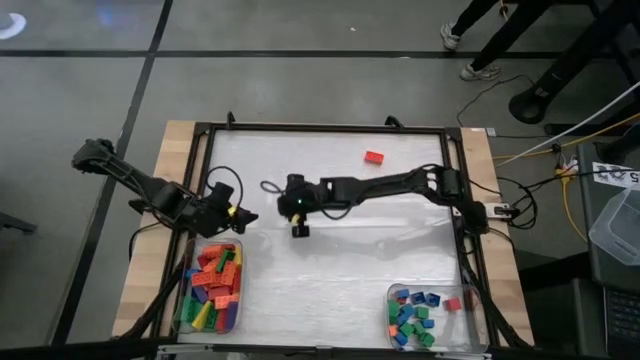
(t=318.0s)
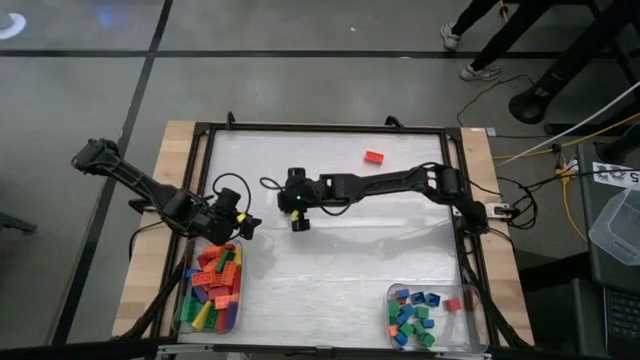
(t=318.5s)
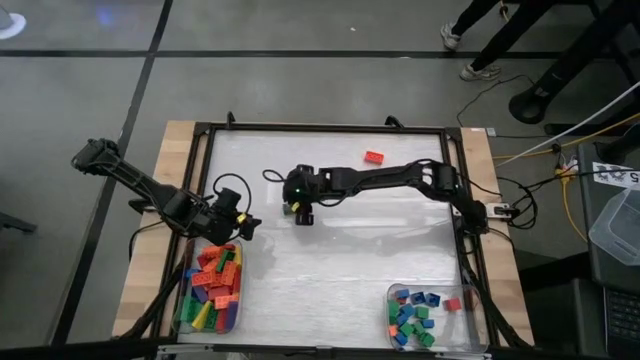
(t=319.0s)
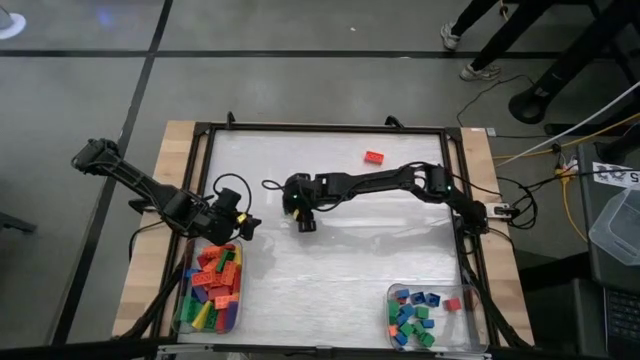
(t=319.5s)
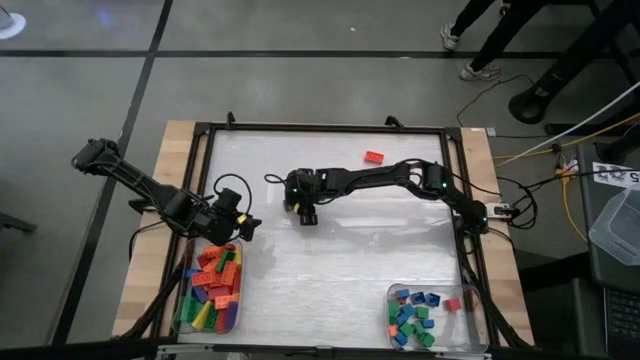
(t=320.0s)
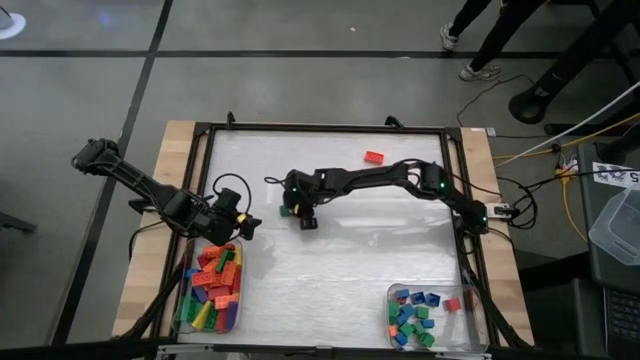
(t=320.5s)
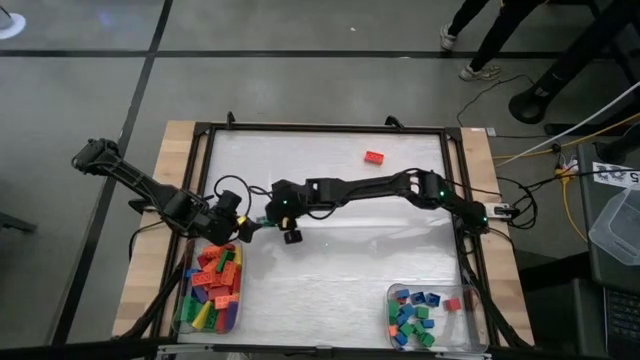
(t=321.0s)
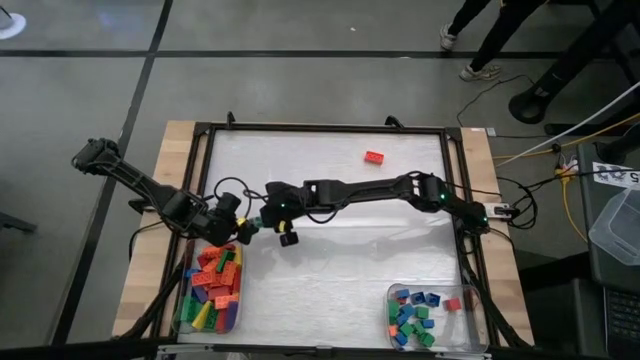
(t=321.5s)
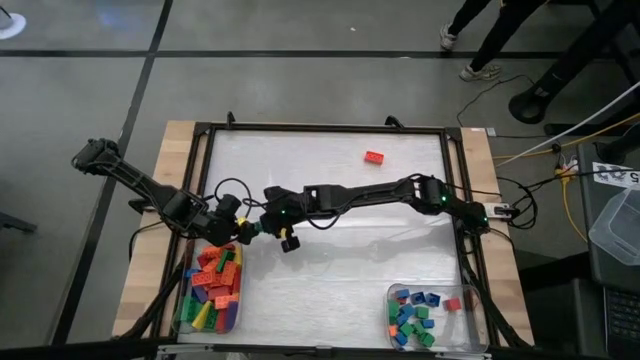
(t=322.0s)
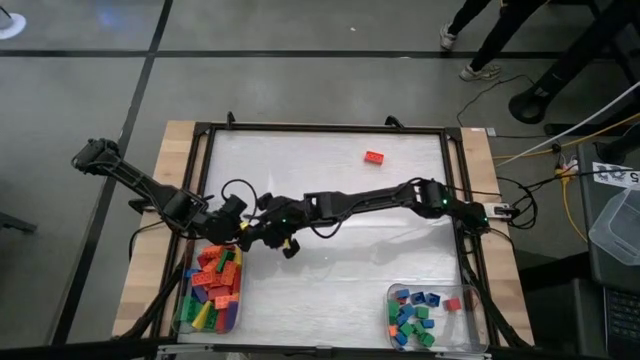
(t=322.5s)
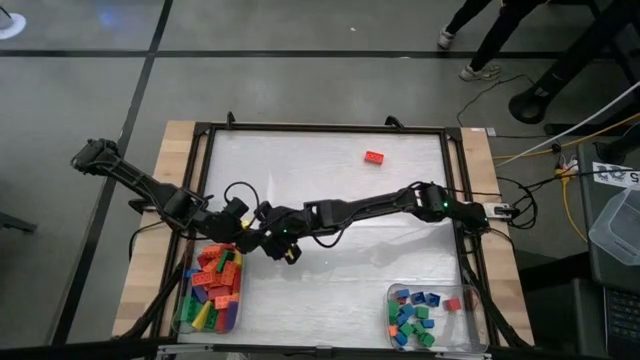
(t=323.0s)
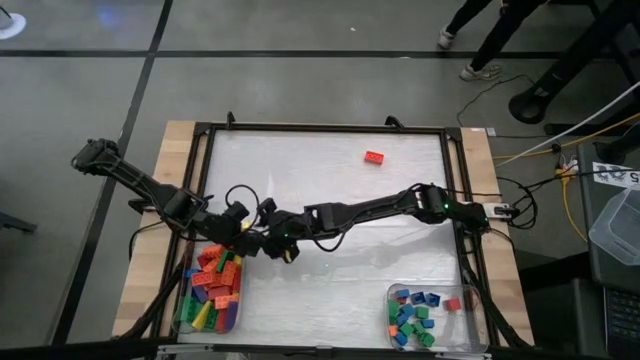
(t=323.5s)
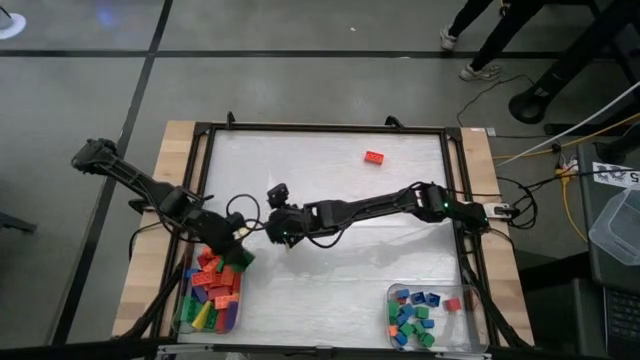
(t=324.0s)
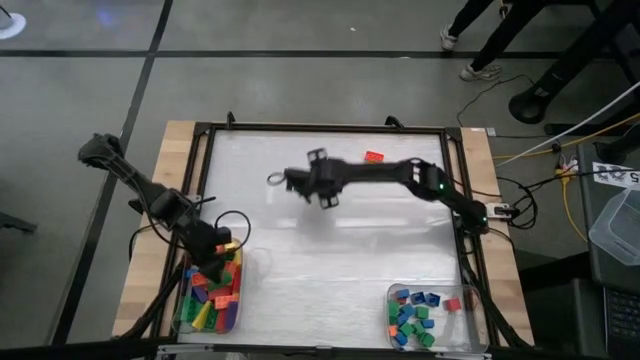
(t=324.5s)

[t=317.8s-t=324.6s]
Task: Sort blocks by size
Put the large green game piece into the left transparent bin

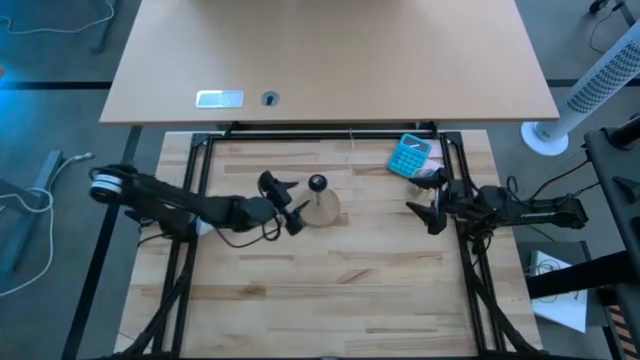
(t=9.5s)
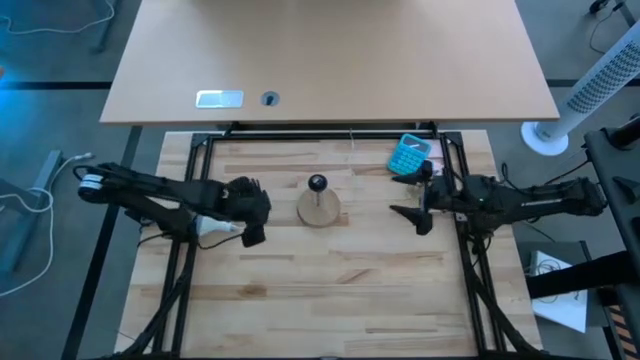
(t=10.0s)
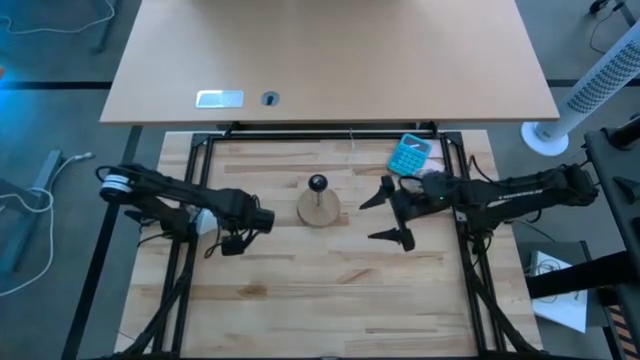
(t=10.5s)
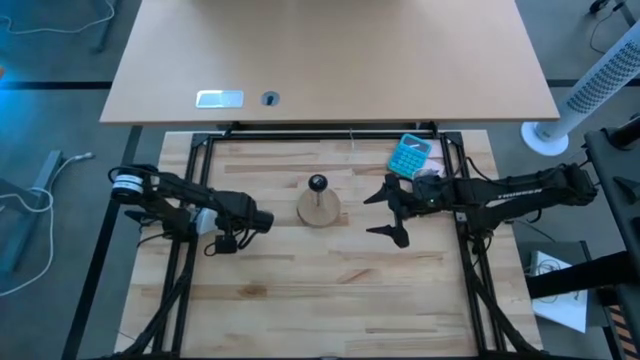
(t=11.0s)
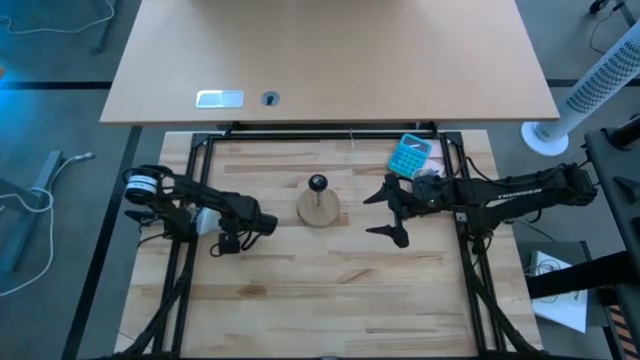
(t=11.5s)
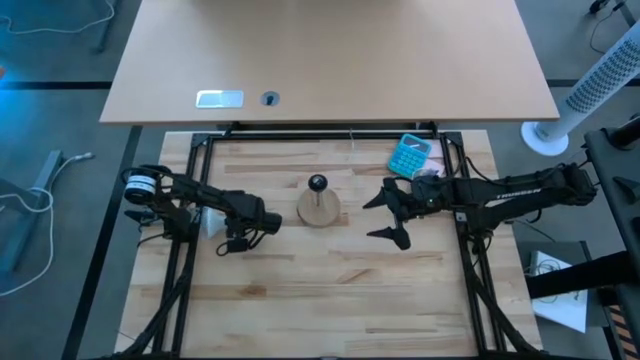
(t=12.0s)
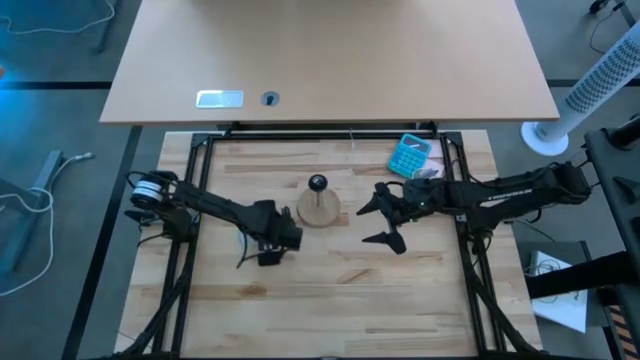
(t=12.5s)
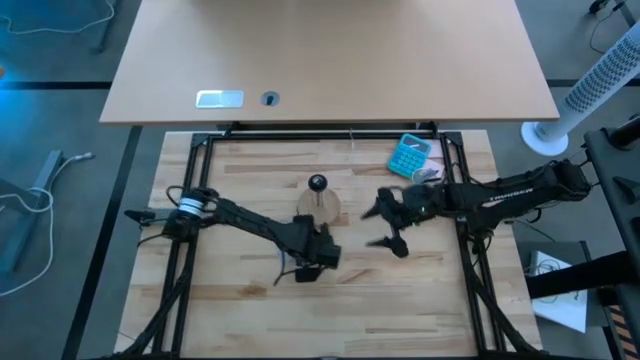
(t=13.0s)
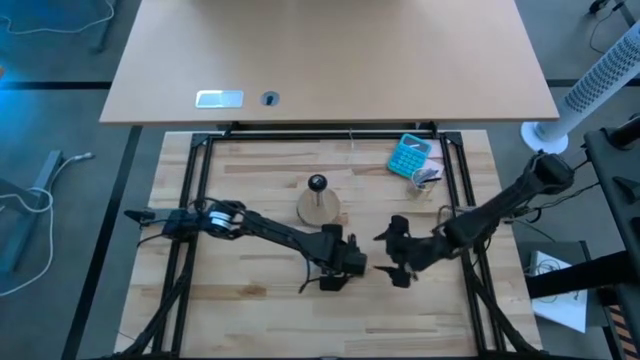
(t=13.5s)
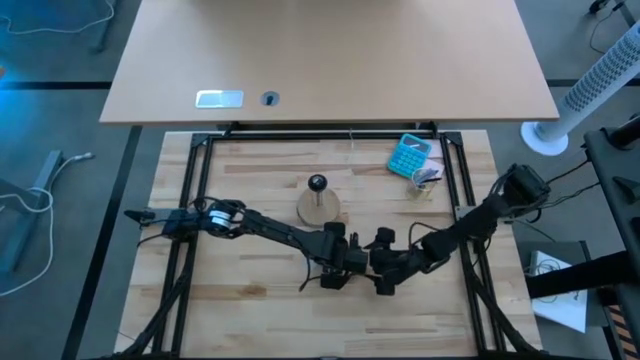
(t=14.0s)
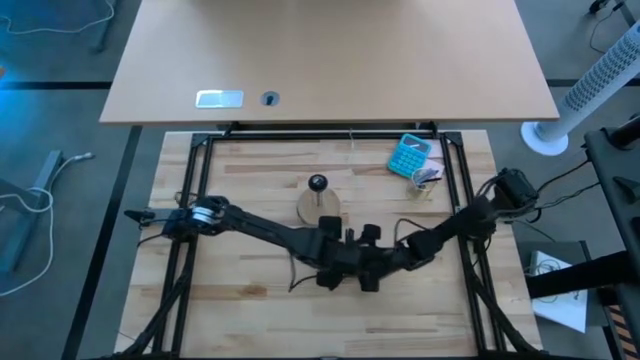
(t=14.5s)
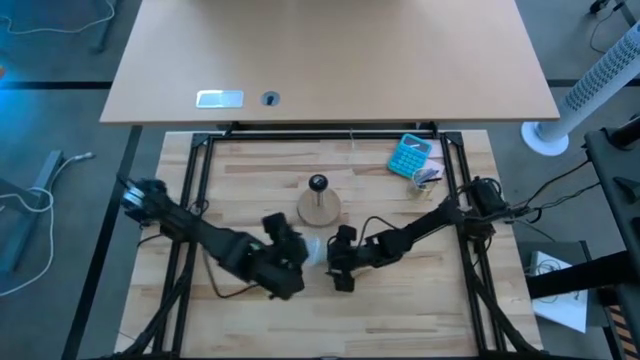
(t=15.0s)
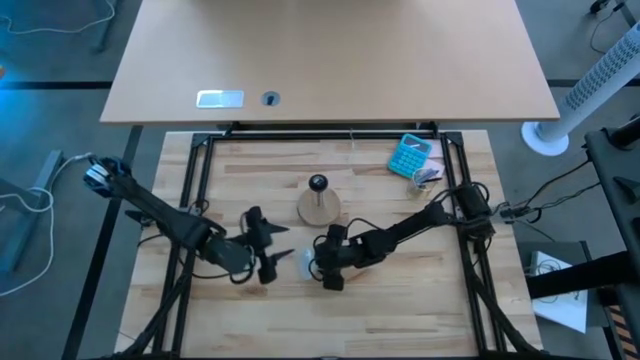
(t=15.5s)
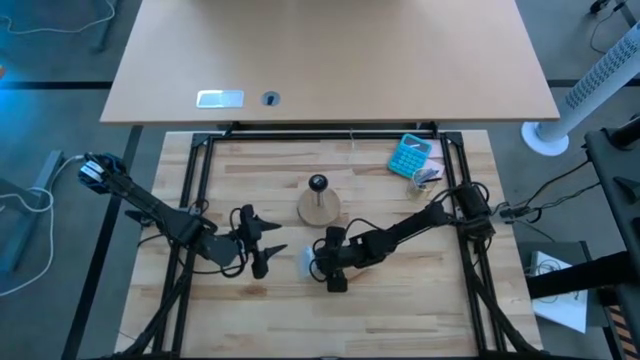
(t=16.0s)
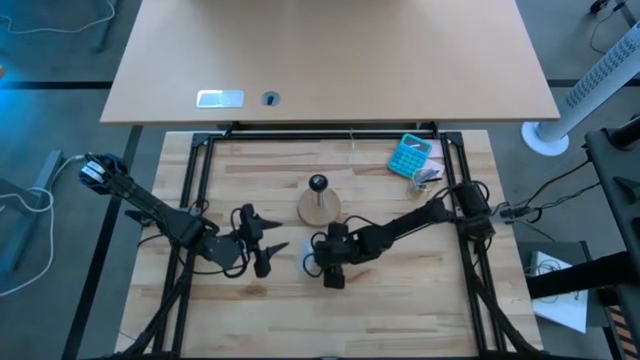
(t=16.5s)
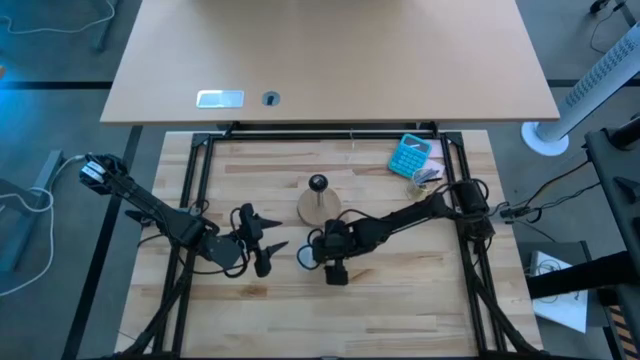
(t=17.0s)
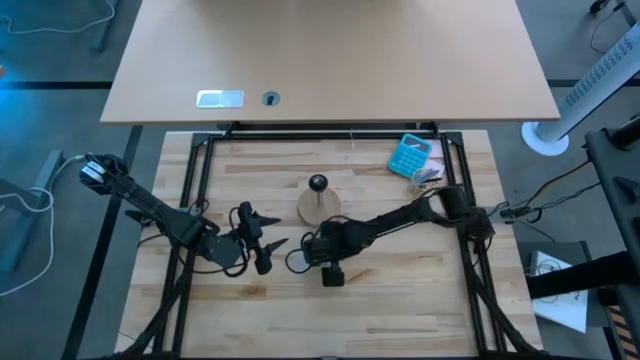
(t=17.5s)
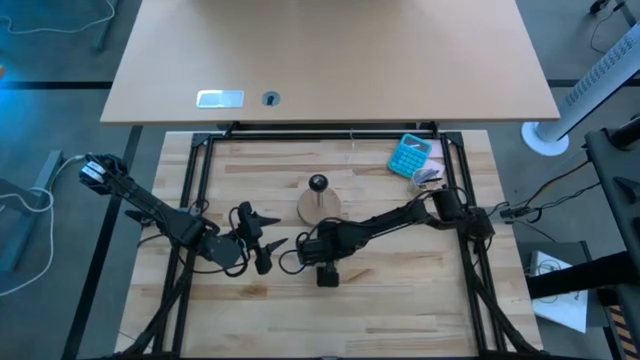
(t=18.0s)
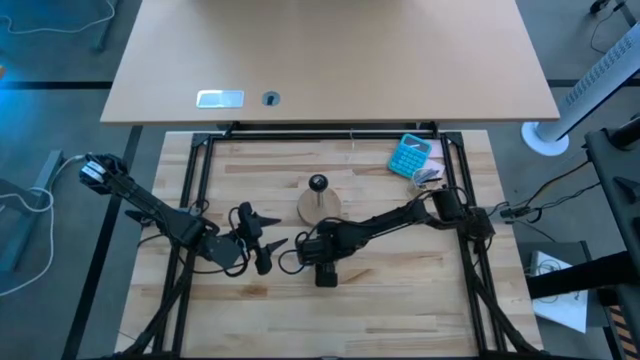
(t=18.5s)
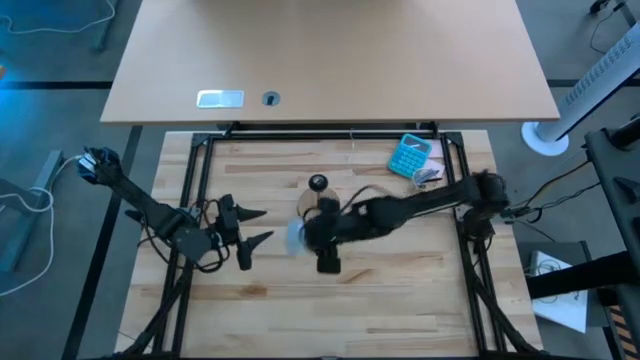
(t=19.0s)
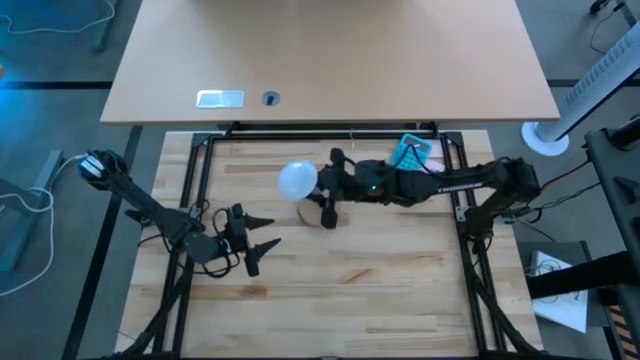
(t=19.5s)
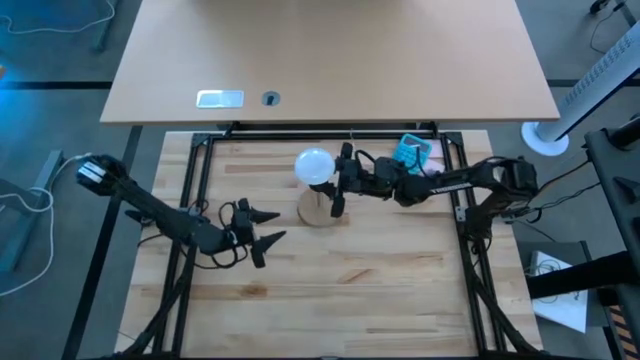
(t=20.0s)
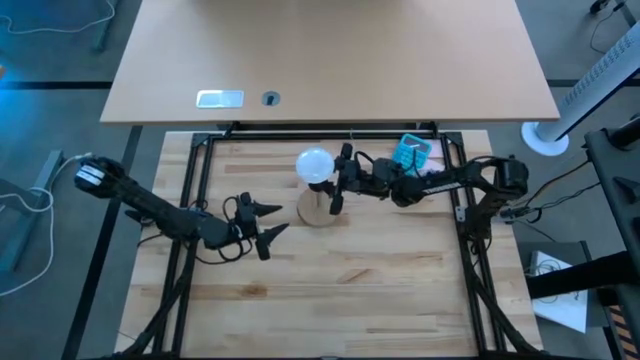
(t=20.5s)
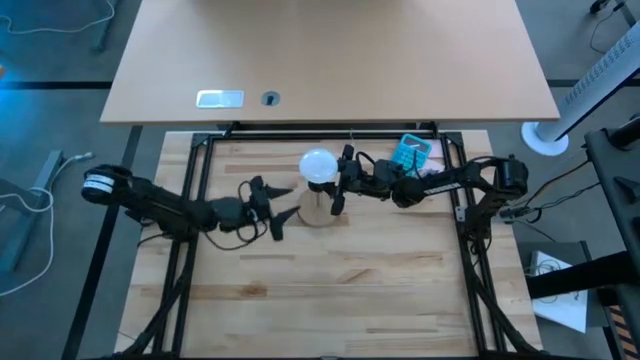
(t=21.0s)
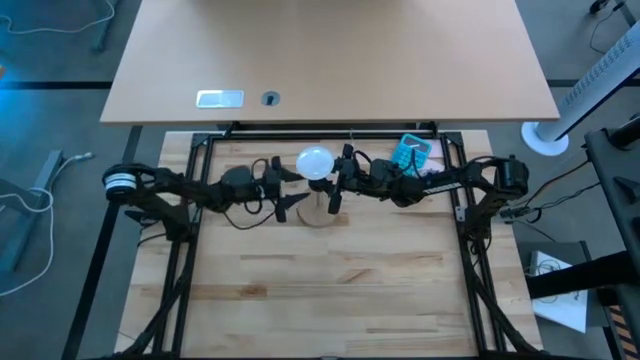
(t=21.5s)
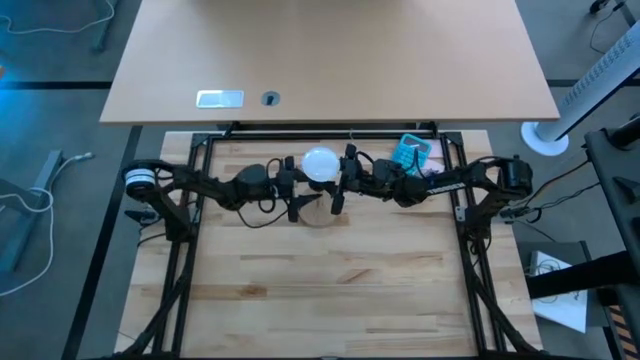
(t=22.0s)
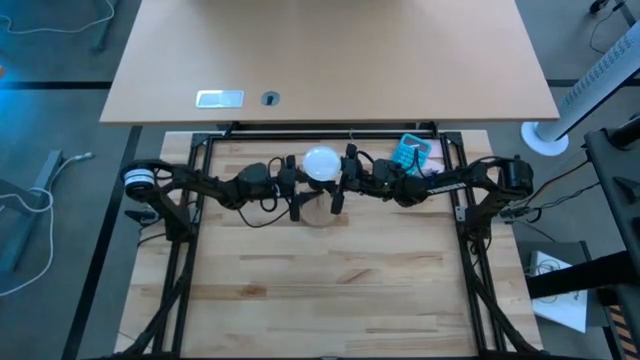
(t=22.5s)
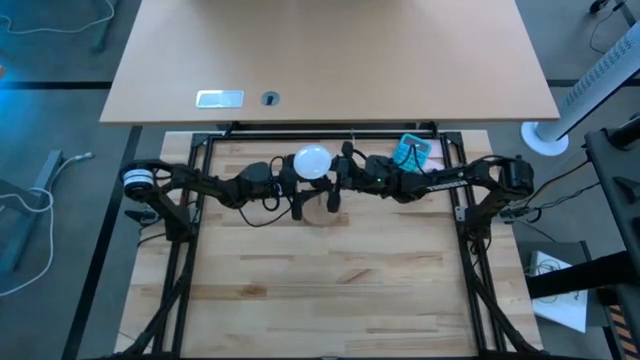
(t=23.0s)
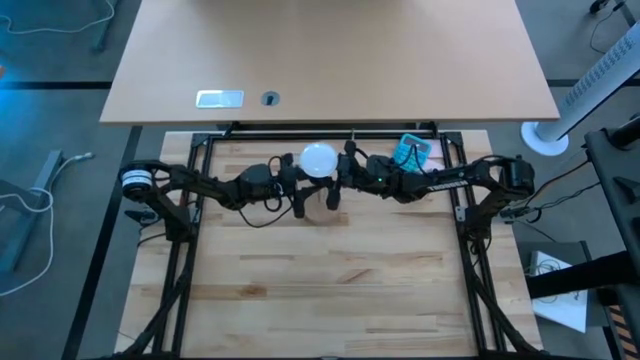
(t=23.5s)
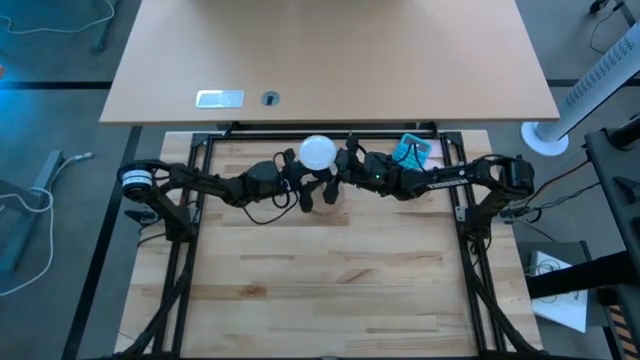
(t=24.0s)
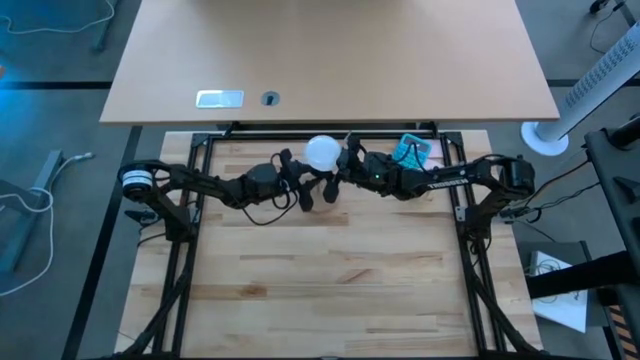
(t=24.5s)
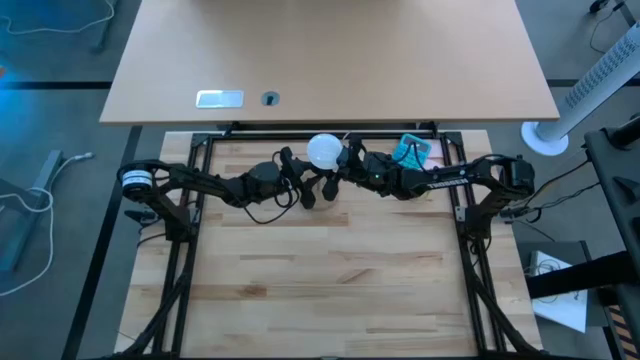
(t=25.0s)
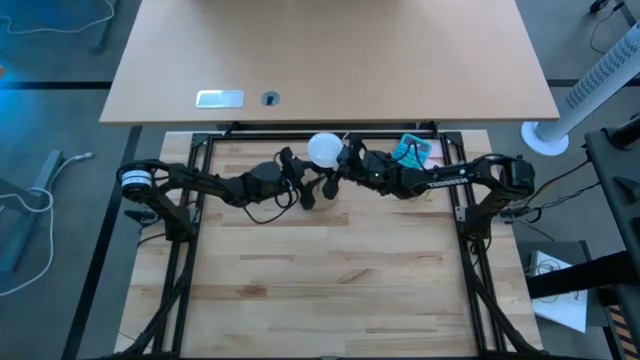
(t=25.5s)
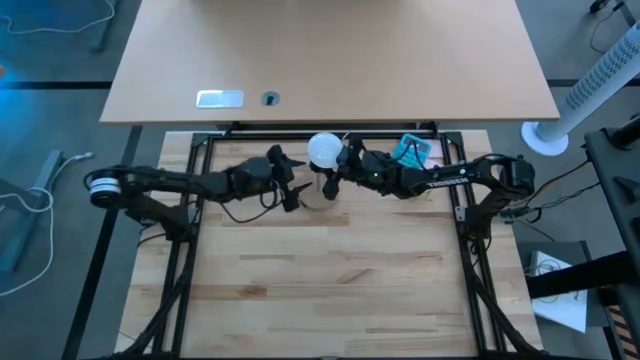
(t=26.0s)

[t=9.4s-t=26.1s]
Task: Screw lightbulb
Insert the light bulb into the table lamp
